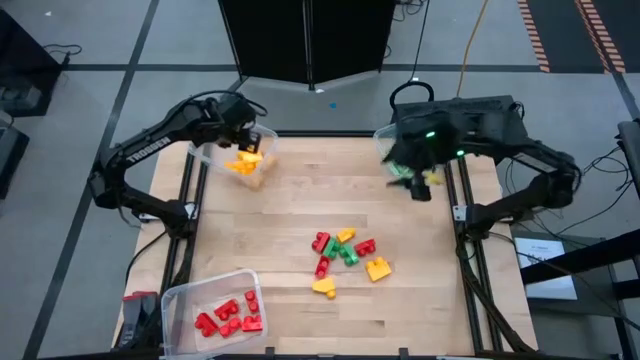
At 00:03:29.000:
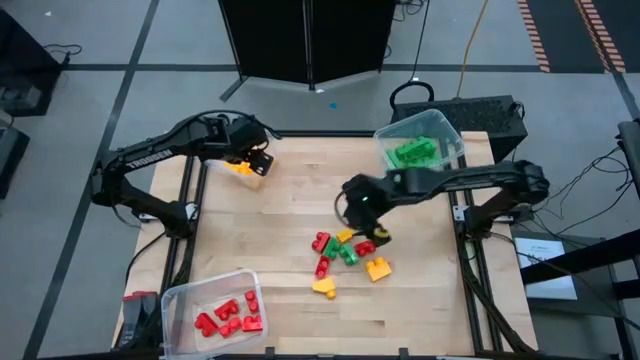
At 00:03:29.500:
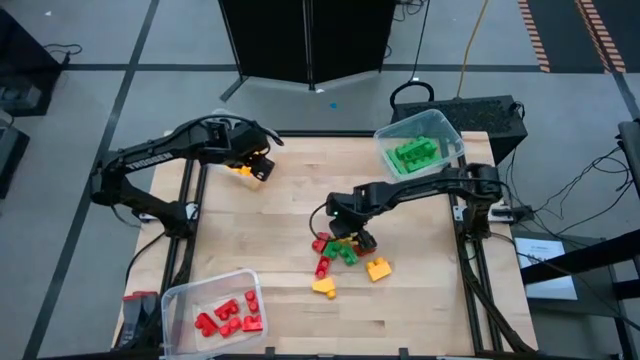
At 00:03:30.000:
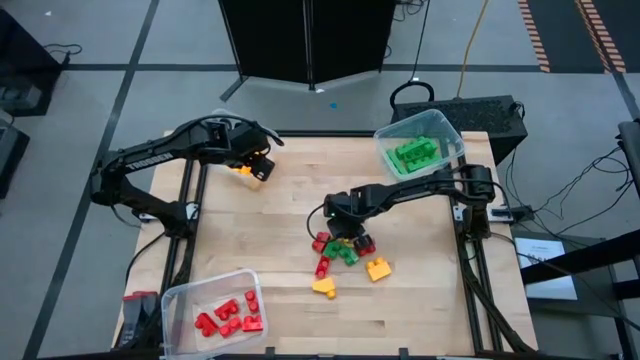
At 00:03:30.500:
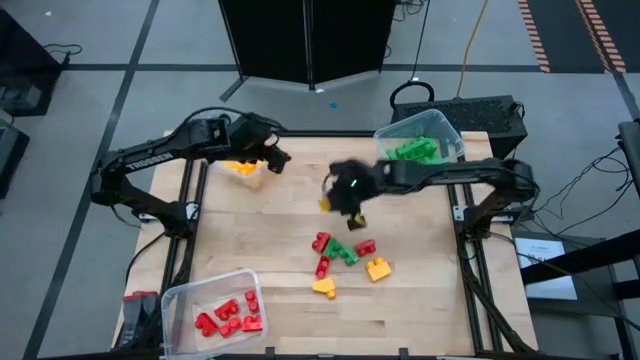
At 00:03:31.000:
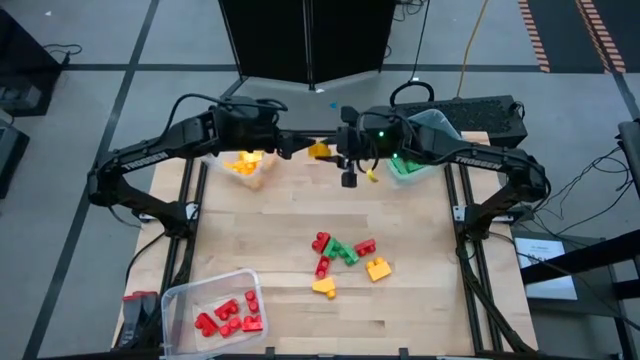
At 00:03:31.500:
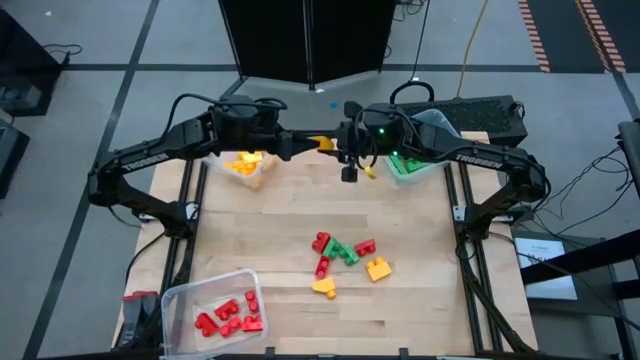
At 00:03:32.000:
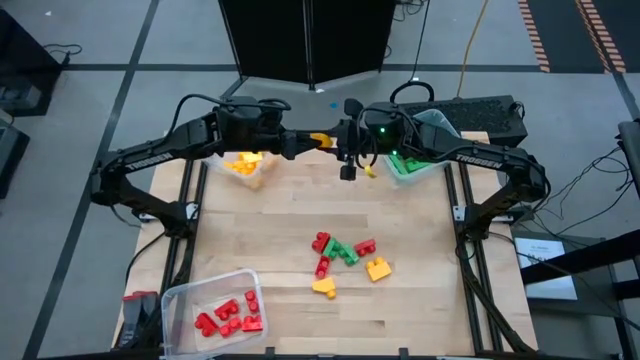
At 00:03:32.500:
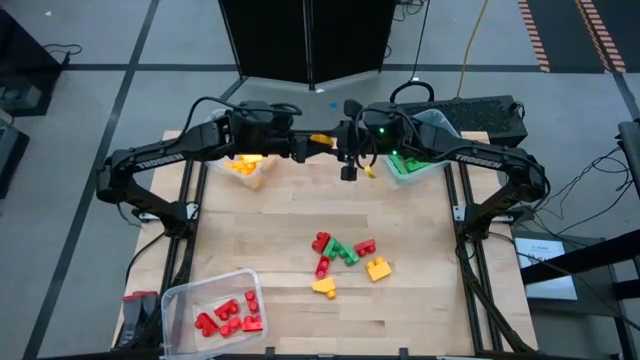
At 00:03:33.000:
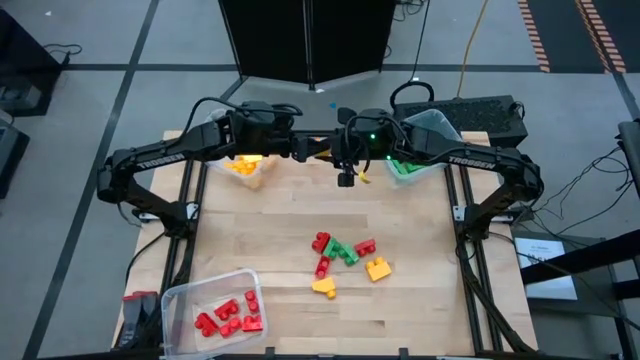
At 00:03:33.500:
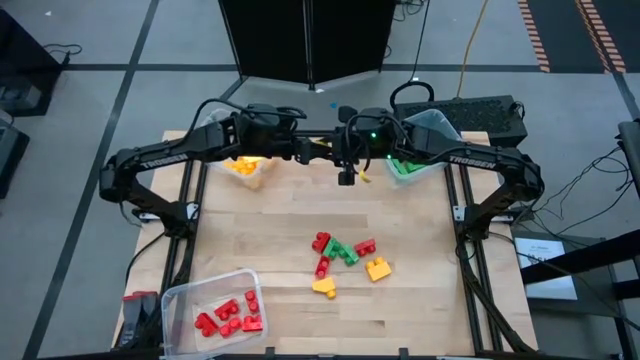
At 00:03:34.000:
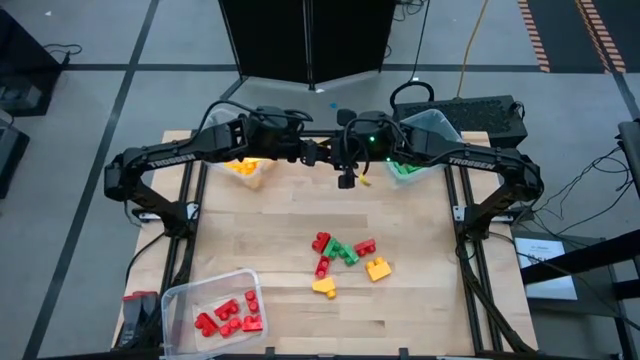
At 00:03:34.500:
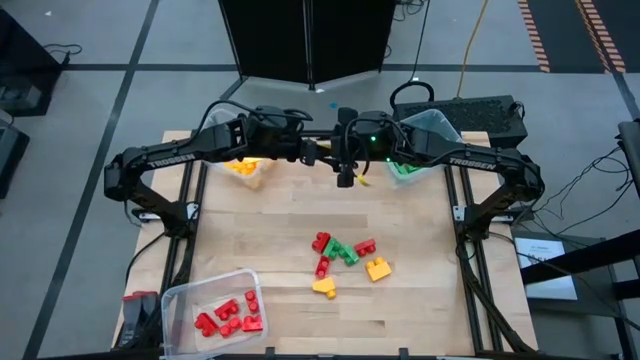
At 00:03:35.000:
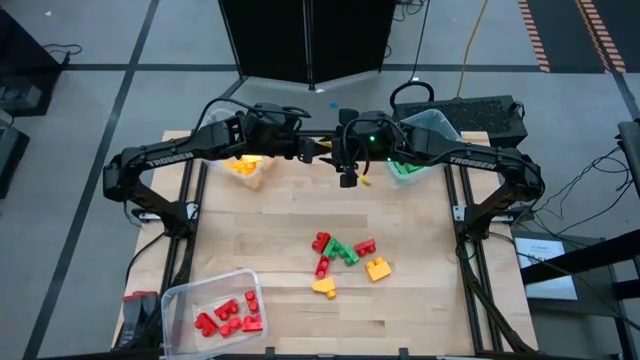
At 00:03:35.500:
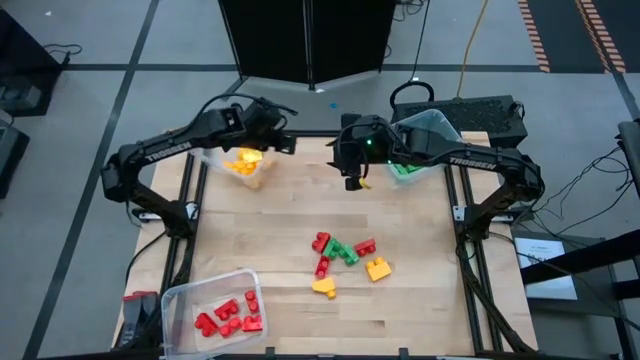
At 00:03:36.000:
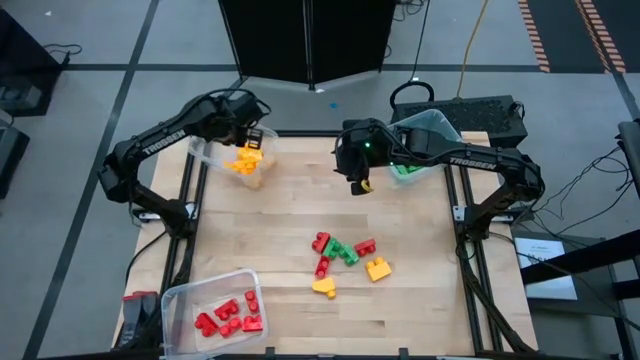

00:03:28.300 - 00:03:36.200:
Task: Sort blocks
Put the yellow game piece into the top left transparent bin

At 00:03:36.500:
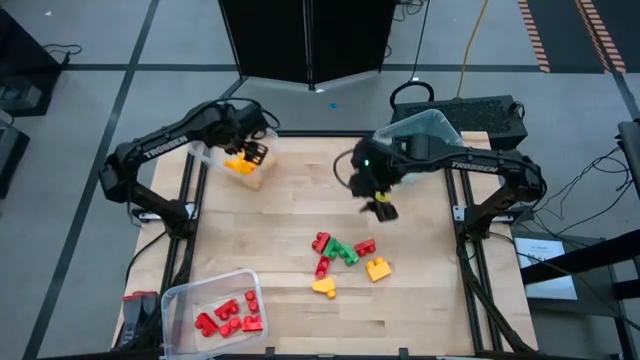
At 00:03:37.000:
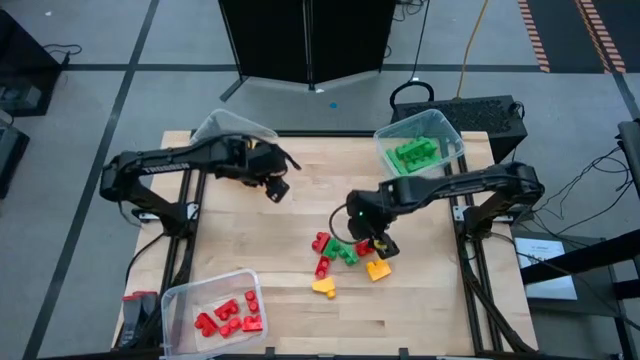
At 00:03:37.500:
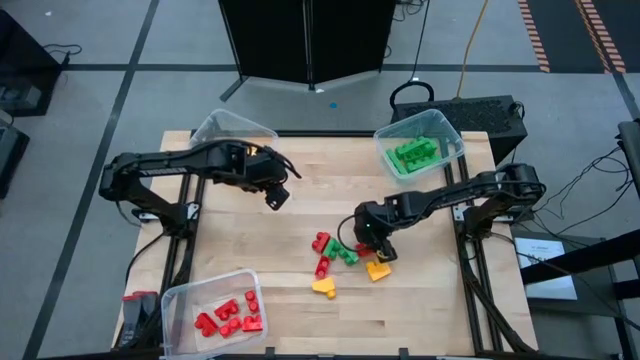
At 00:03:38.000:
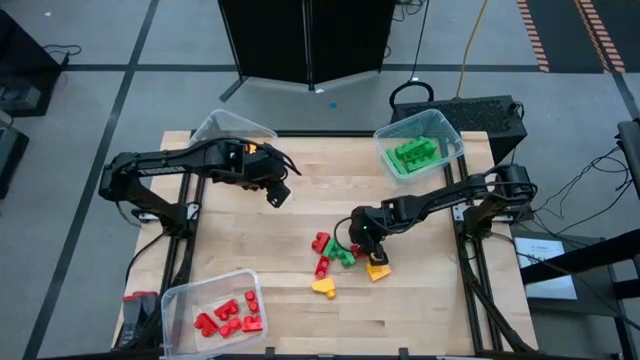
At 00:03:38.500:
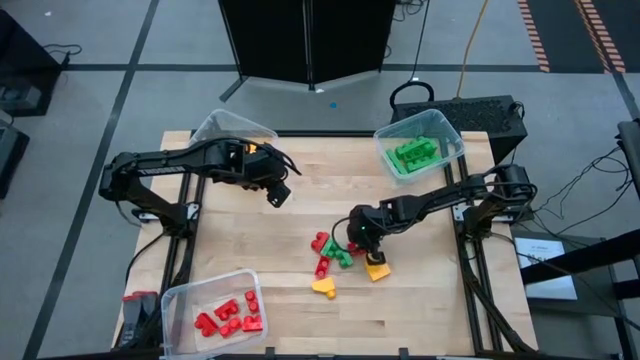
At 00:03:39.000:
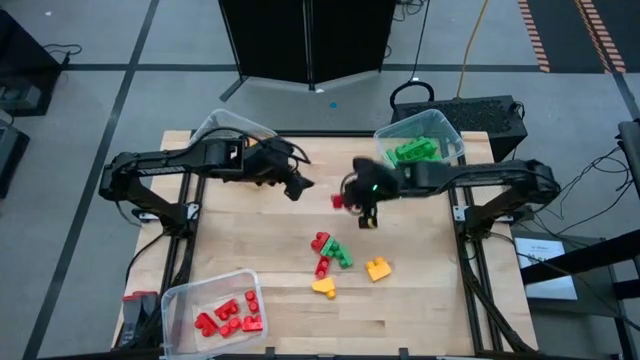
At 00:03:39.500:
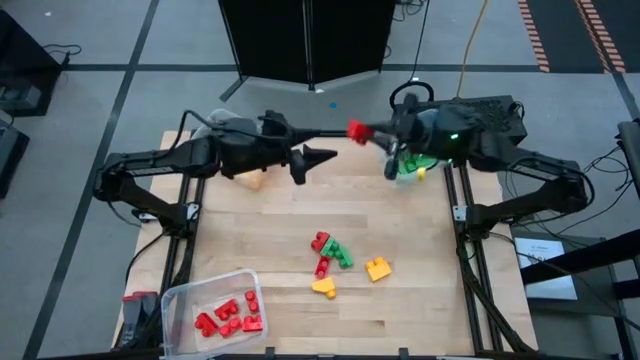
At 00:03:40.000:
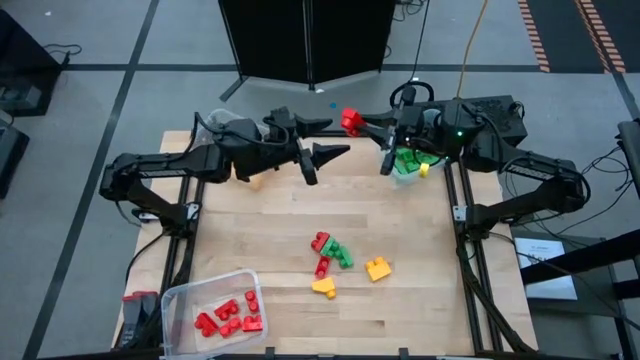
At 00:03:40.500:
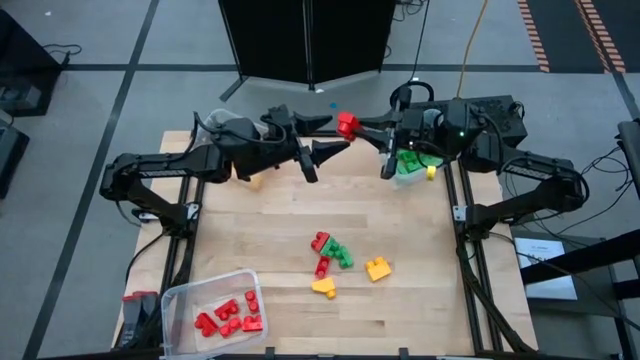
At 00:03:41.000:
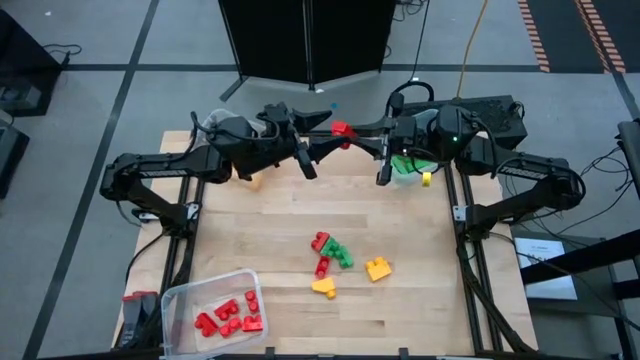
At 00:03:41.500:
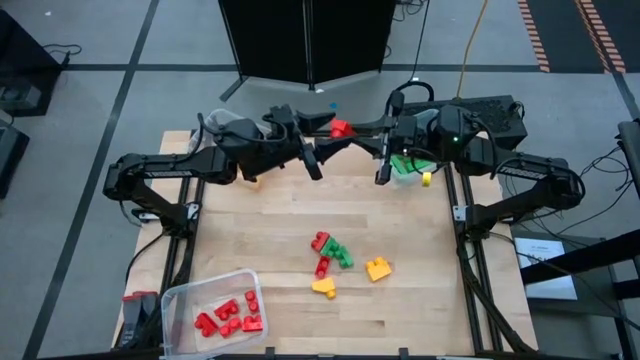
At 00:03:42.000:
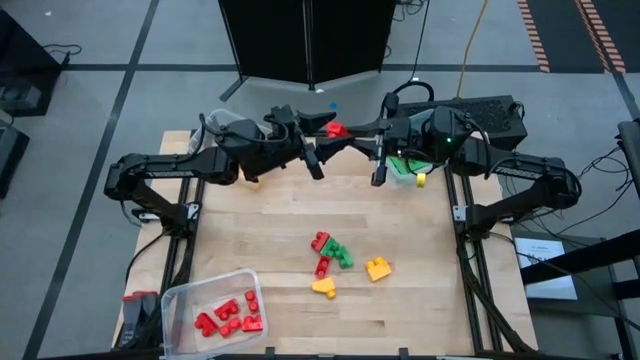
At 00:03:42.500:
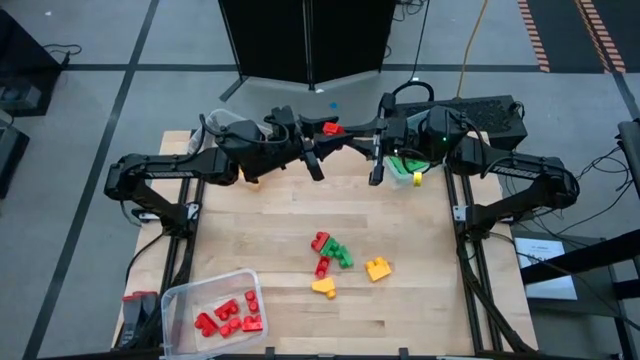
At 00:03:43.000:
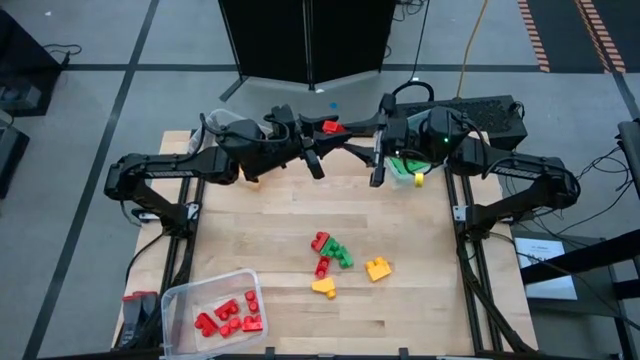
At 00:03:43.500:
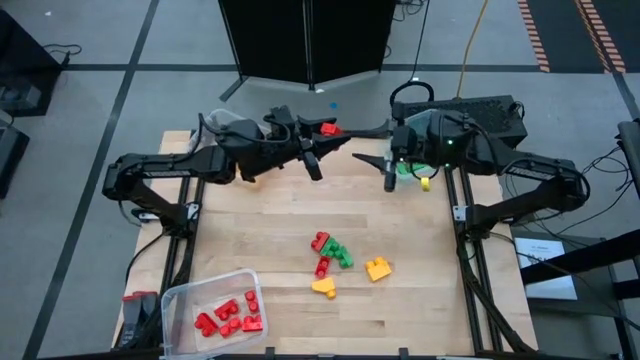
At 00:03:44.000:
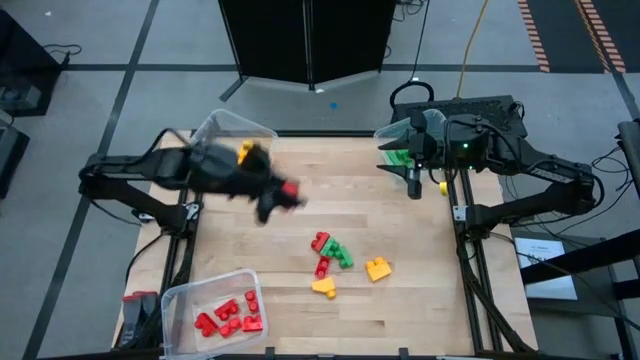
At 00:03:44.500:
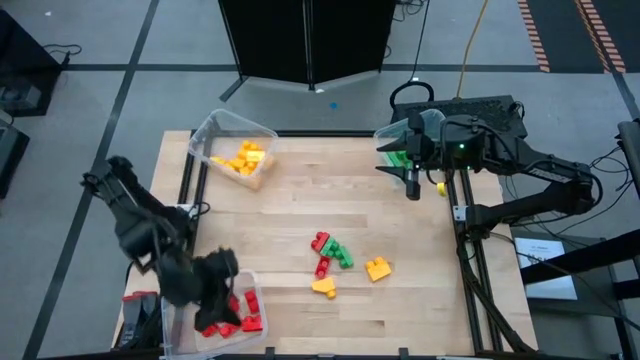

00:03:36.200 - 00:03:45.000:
Put the red game piece into the bottom transparent bin

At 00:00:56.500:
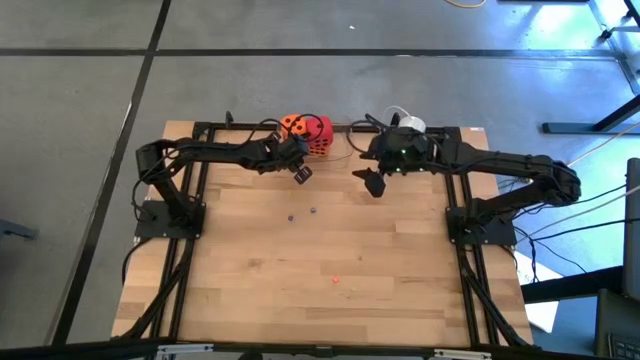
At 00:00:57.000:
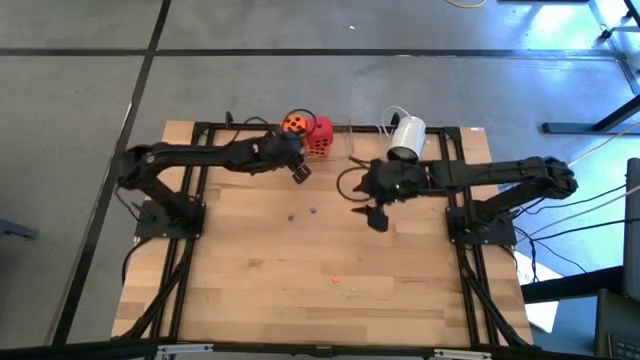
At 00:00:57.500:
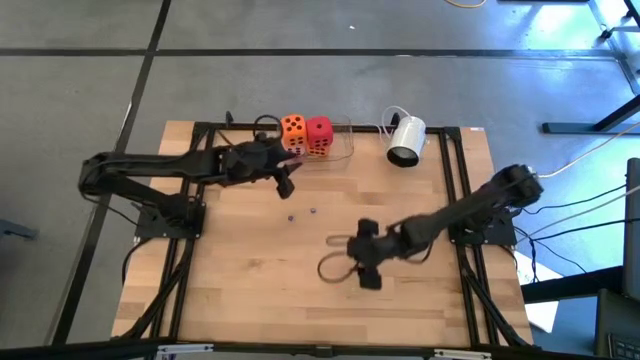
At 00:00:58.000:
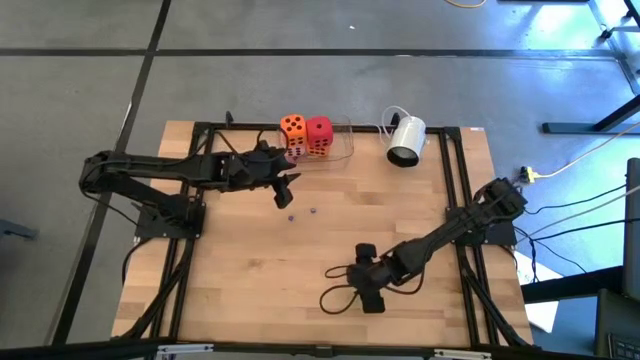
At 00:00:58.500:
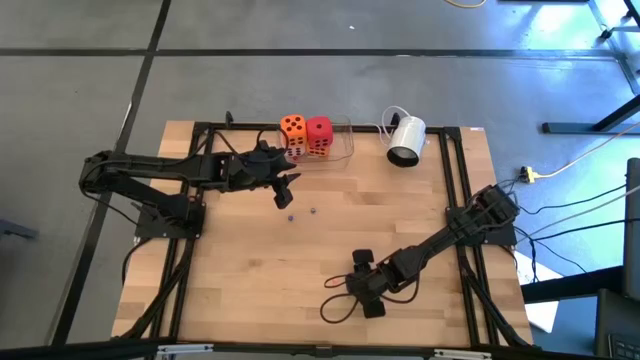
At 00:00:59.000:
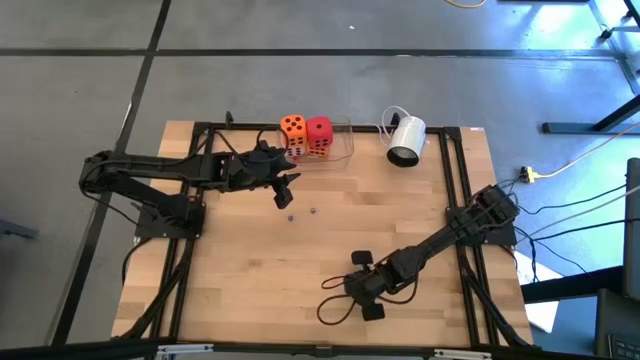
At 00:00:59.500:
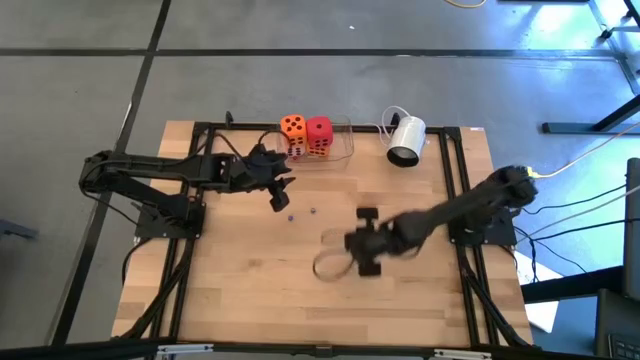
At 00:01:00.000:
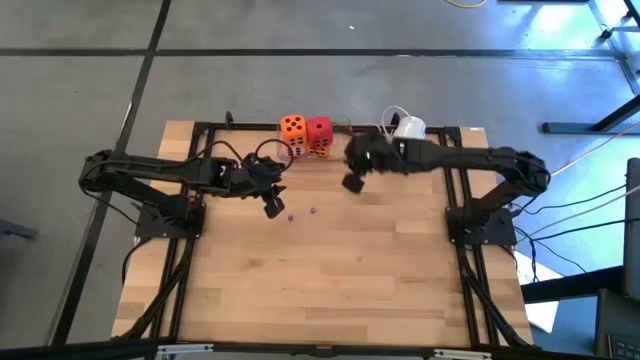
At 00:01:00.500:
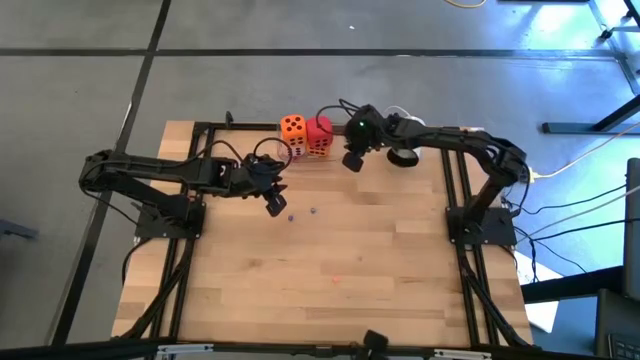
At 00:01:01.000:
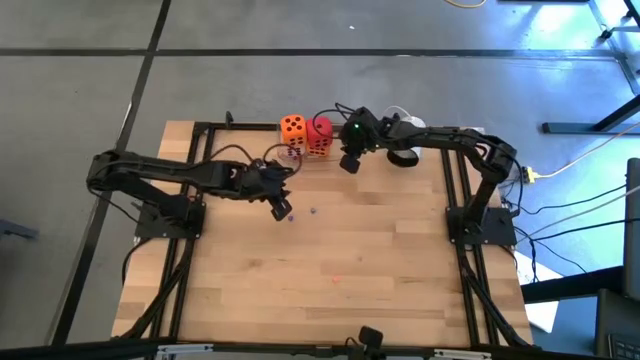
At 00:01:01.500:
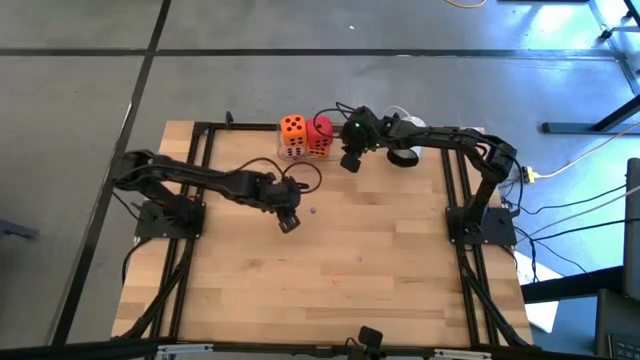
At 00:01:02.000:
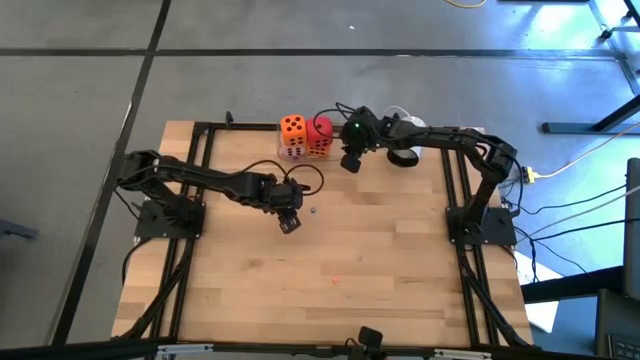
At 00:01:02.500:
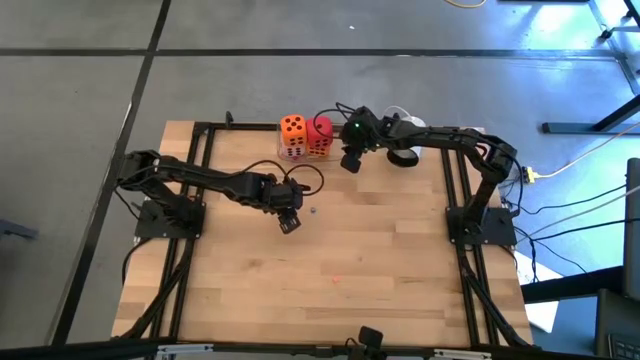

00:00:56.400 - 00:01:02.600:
Task: Pick & Place Dice
Put the small green dice in the transparent bin
